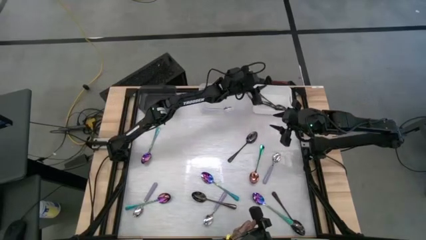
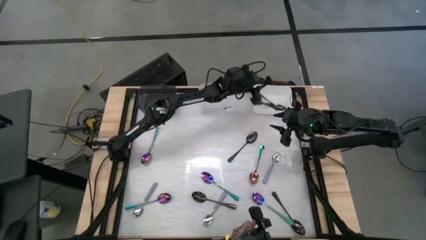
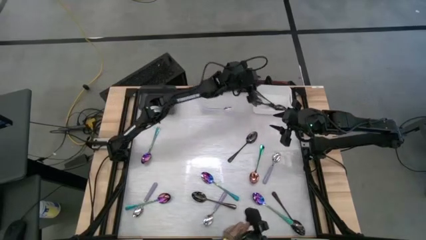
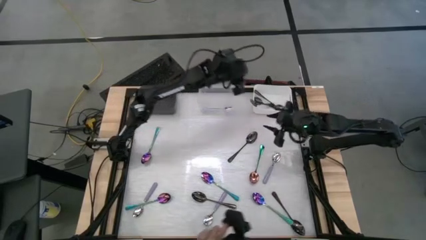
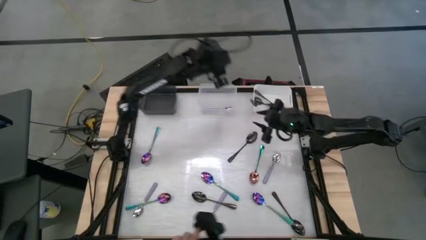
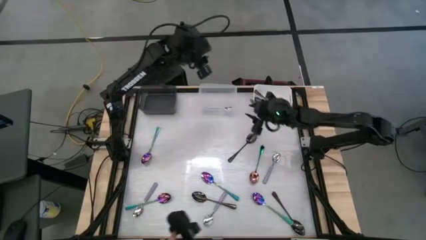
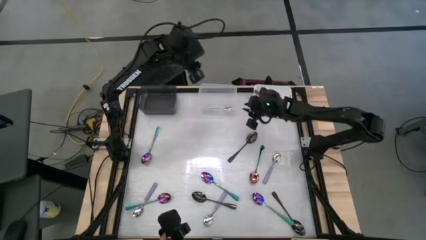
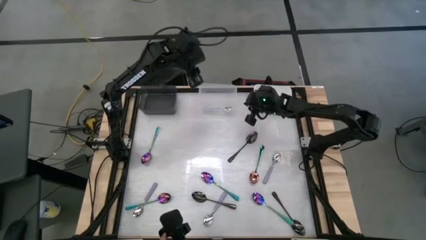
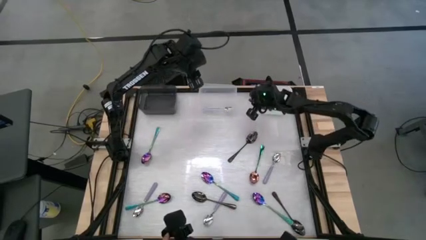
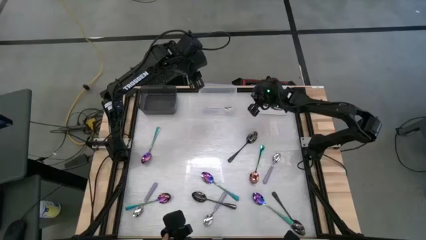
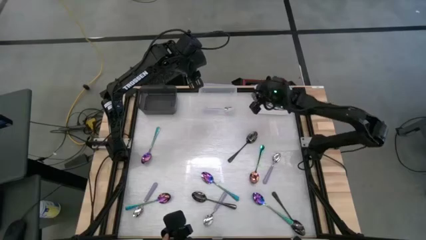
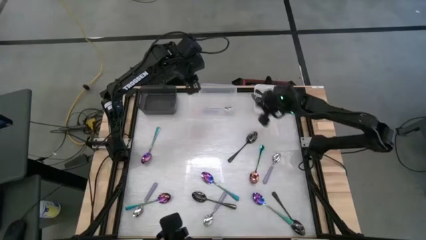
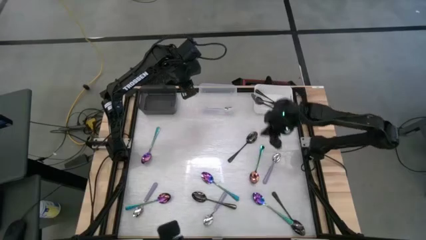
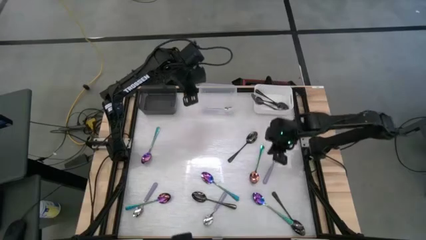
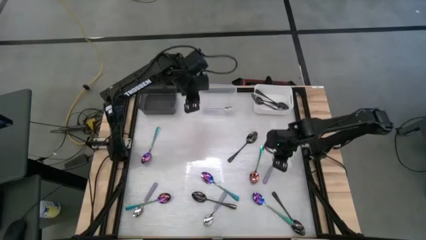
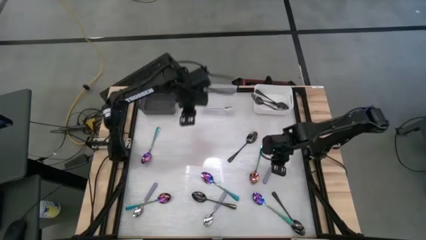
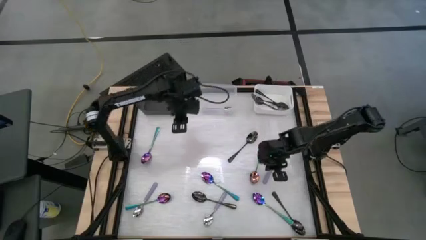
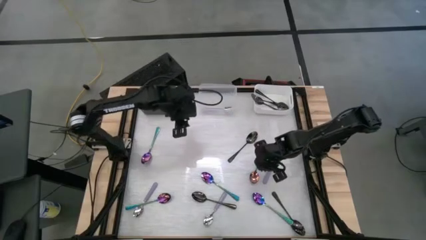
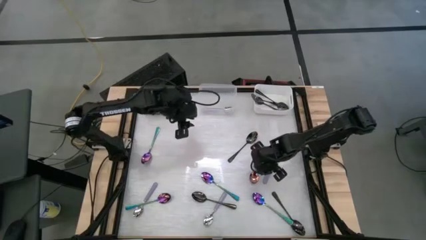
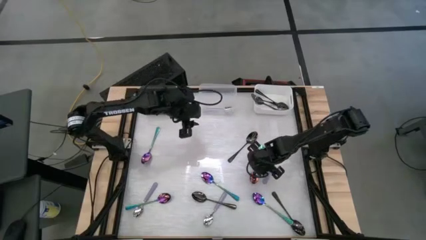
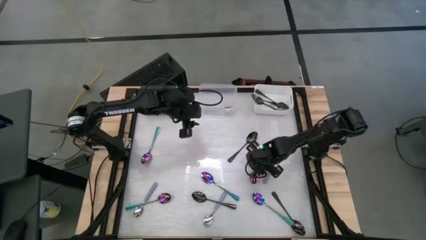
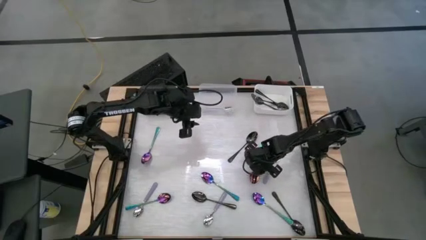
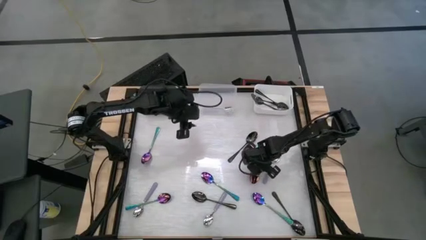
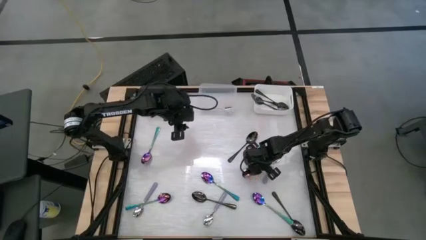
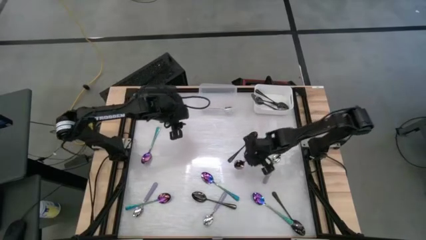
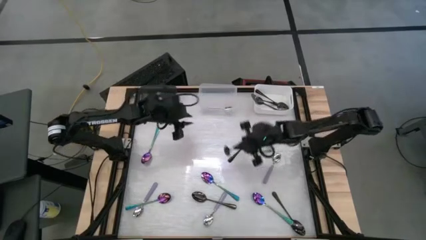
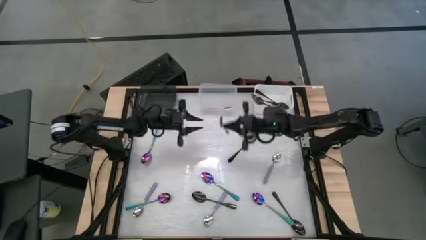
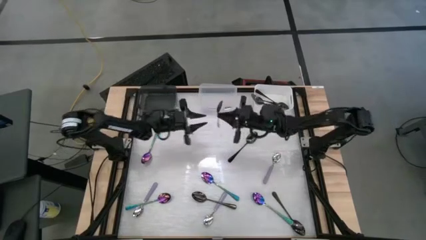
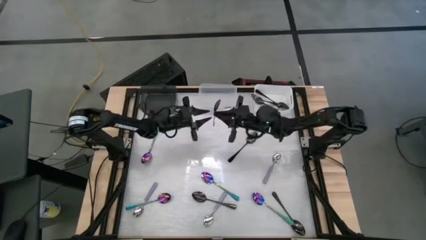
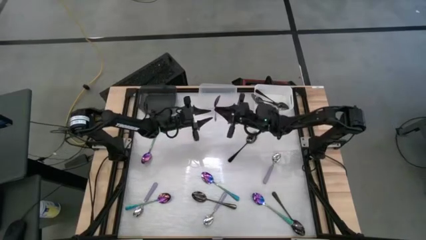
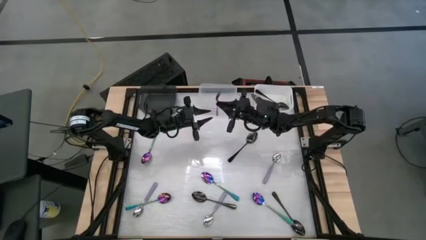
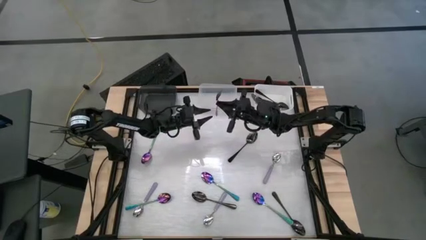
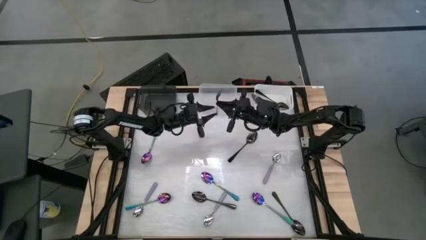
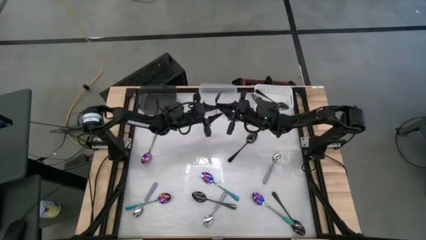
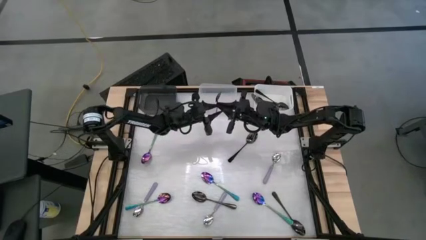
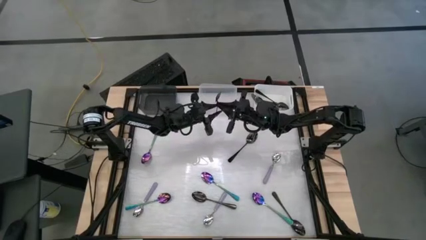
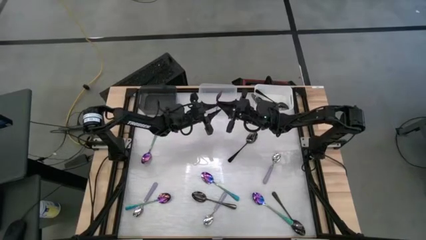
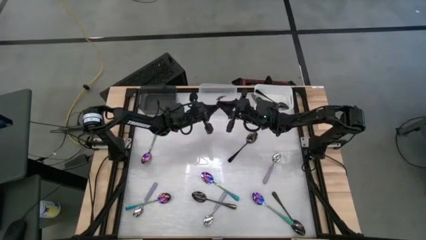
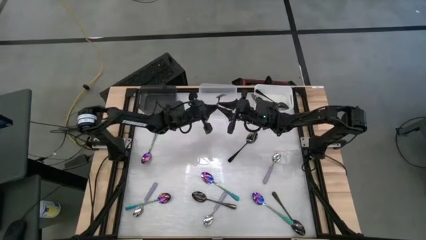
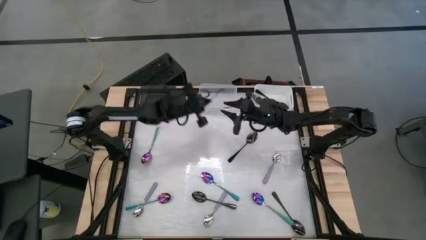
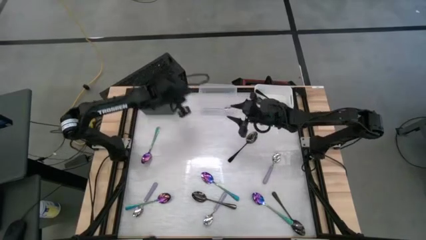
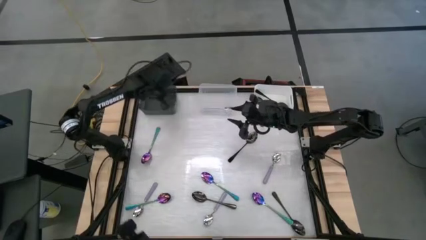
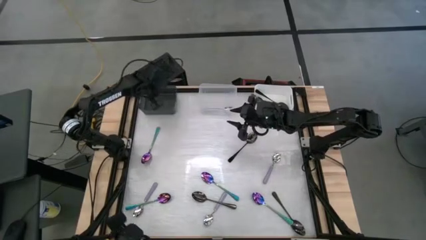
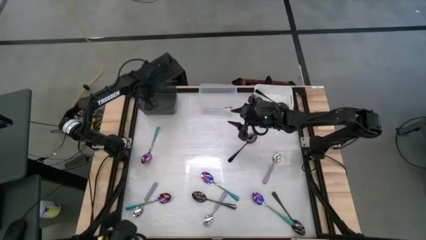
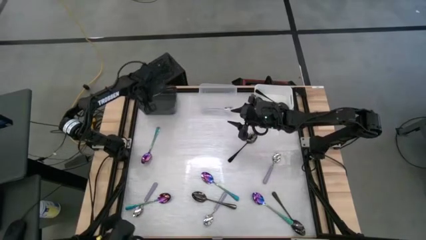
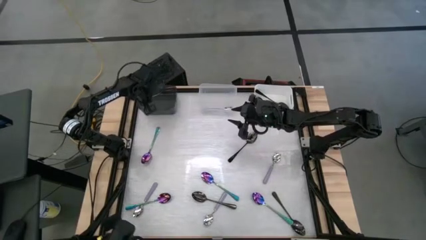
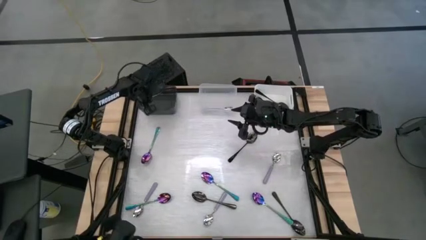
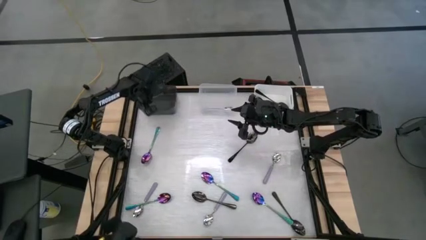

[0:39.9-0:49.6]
Task: Sort silverware by color (type)
Put the blue spoon into the black bin

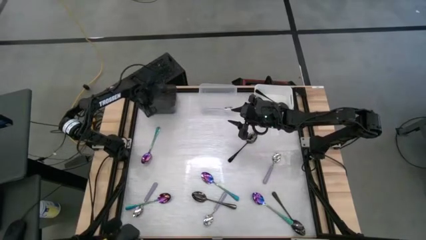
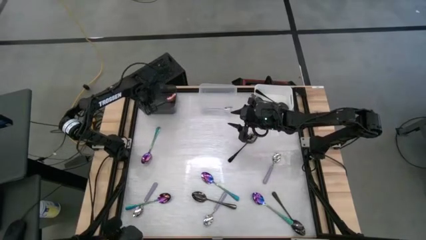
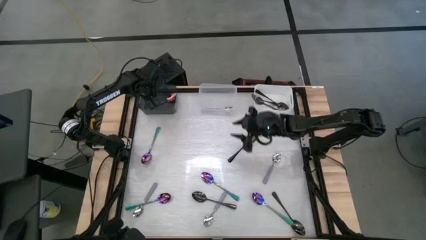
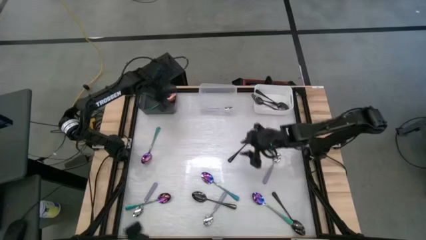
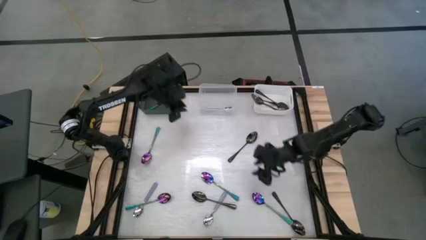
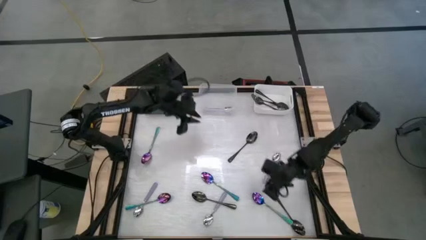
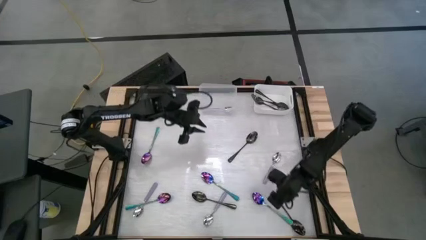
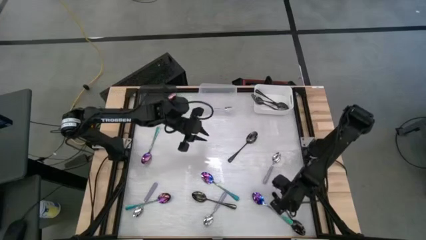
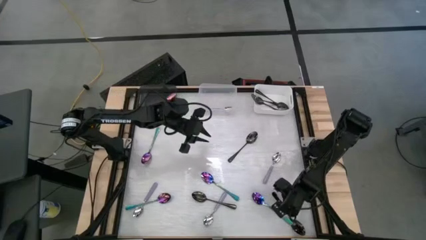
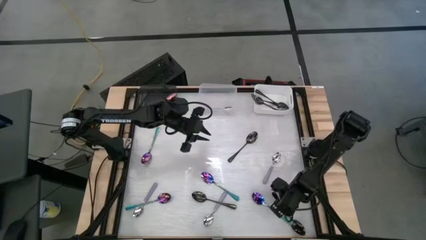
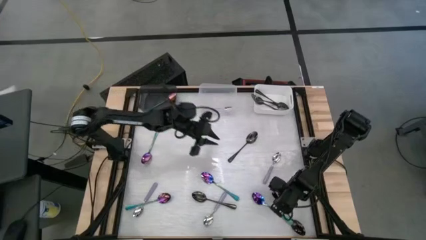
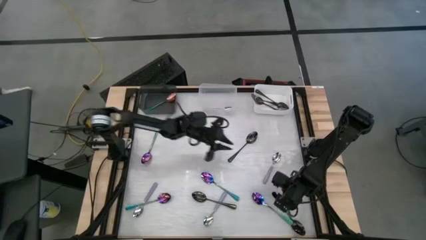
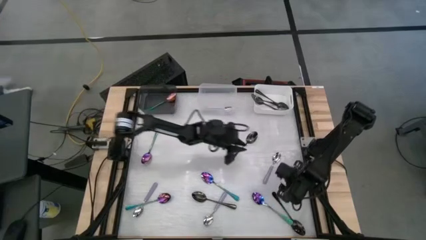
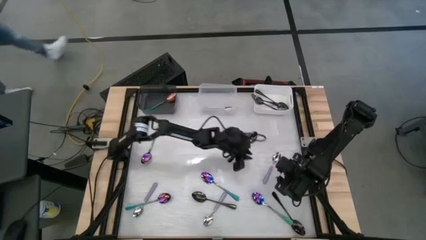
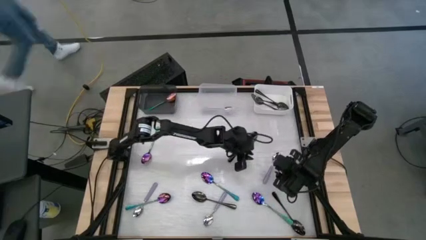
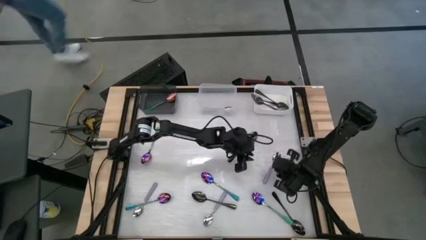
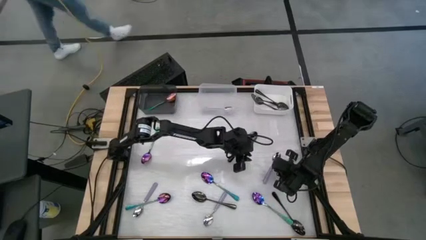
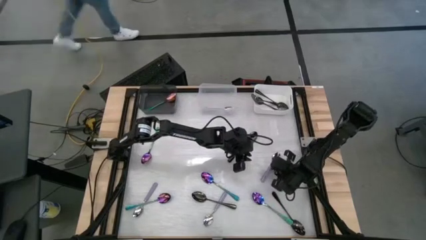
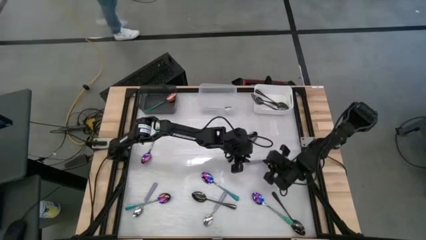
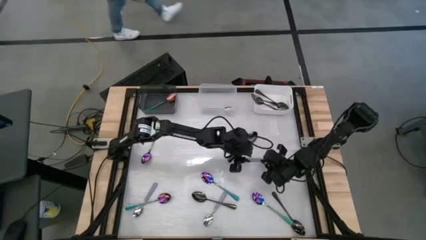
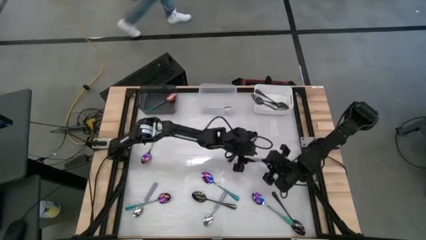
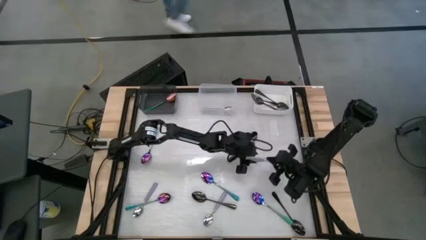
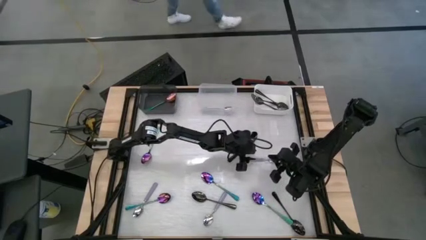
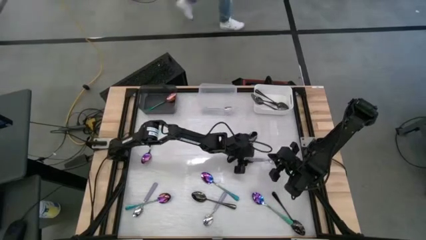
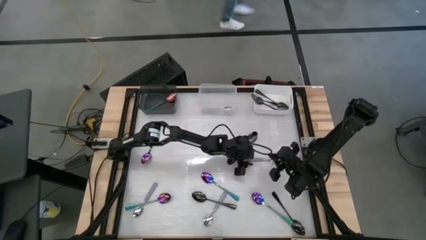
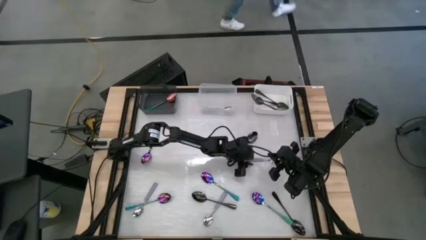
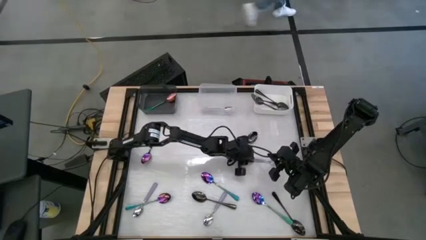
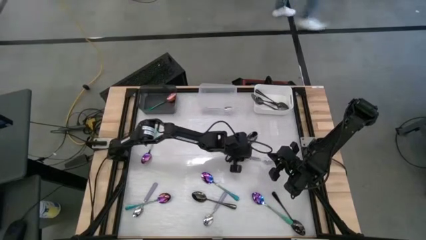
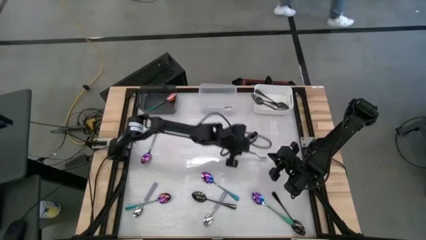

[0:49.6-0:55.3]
Put the purple spoon into the transparent bin

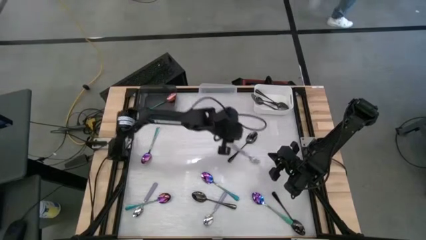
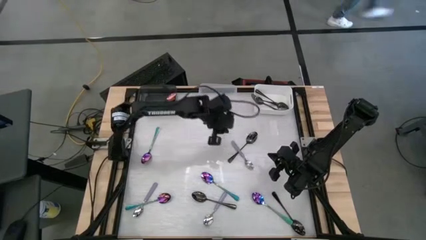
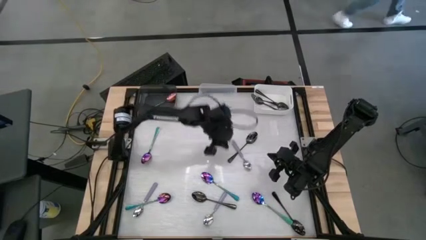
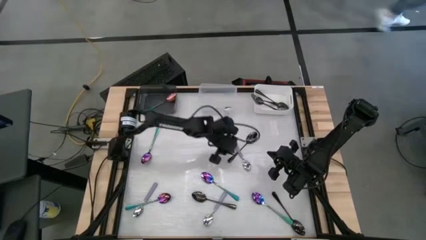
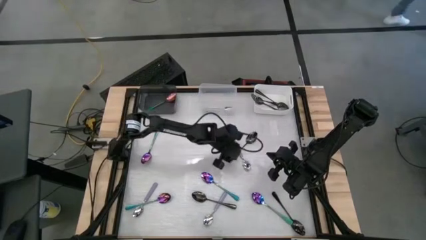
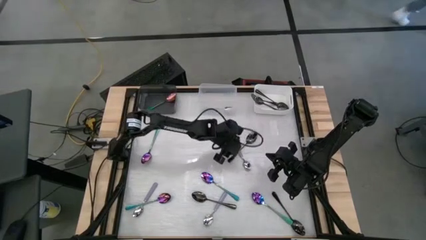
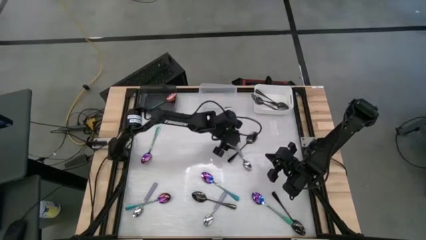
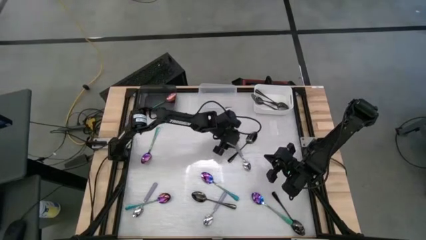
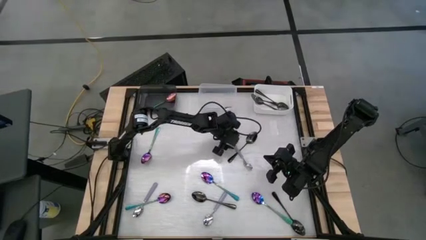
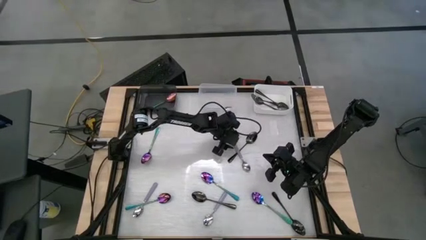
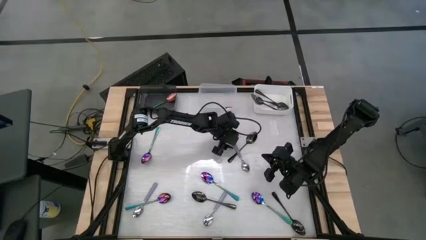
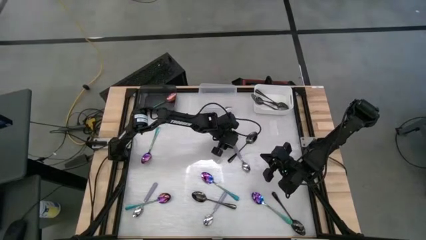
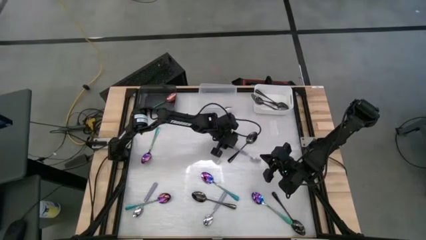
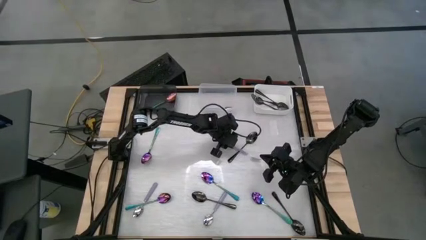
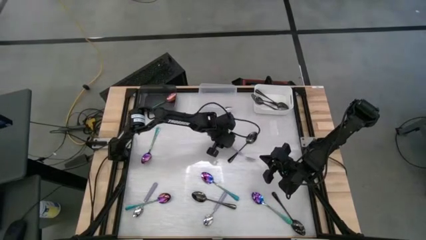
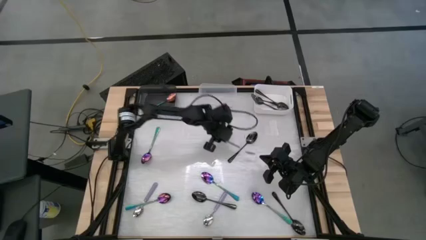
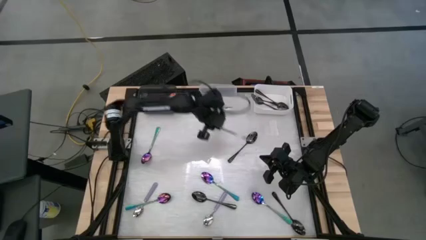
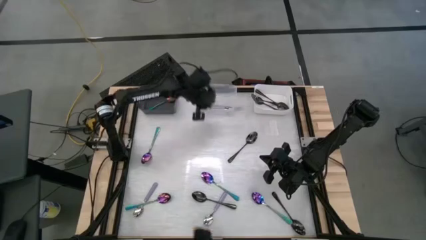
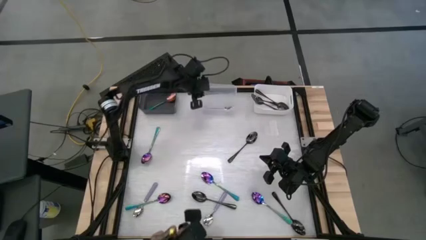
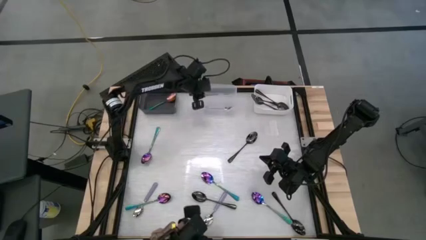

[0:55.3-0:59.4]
Put the purple spoon into the transparent bin
